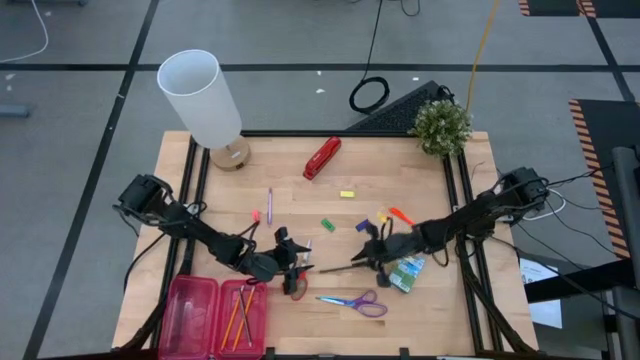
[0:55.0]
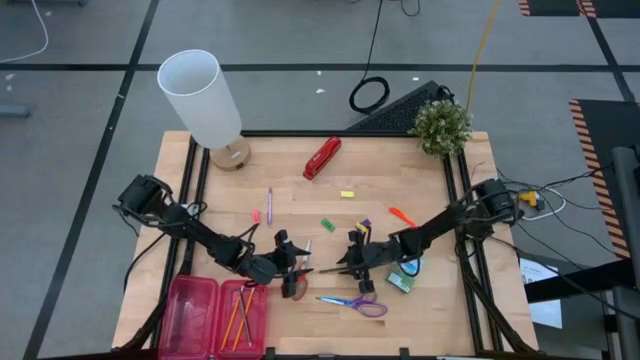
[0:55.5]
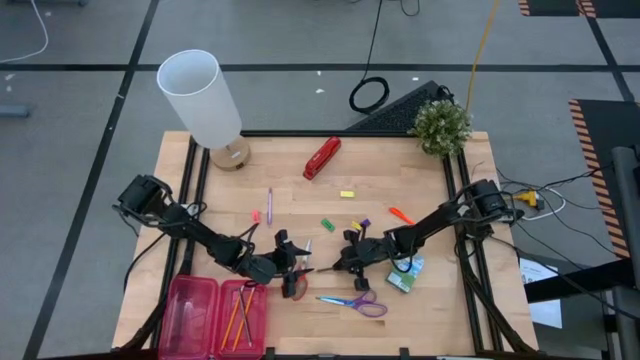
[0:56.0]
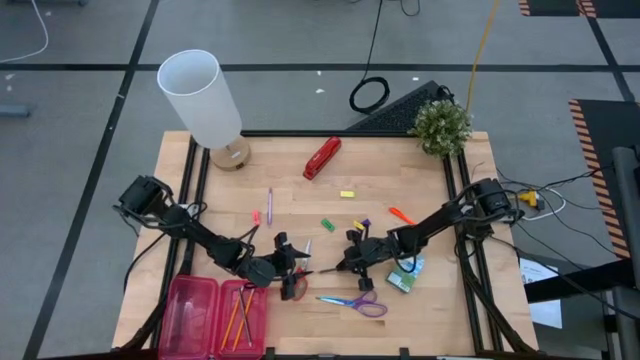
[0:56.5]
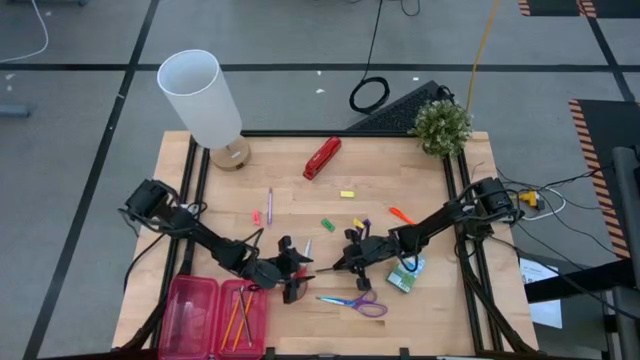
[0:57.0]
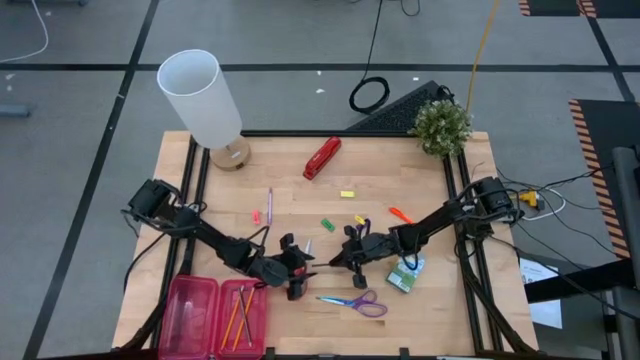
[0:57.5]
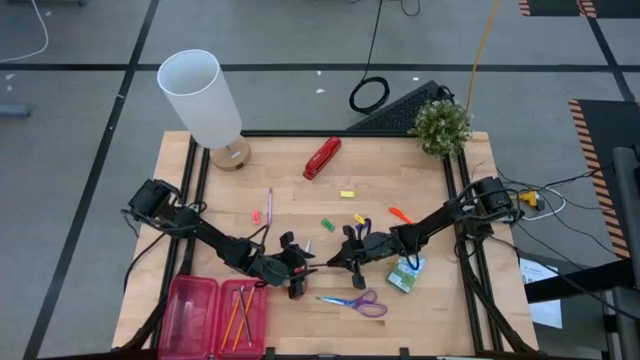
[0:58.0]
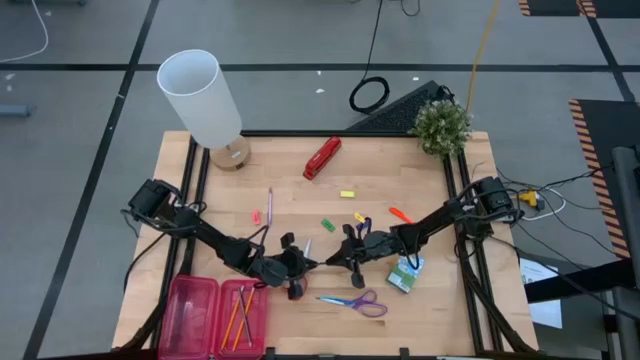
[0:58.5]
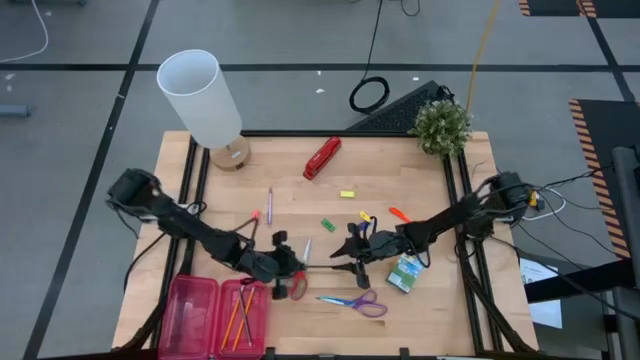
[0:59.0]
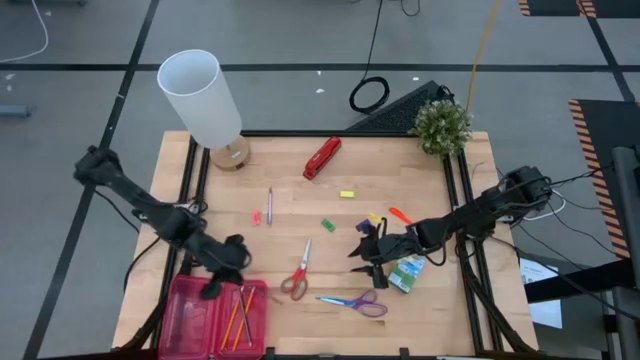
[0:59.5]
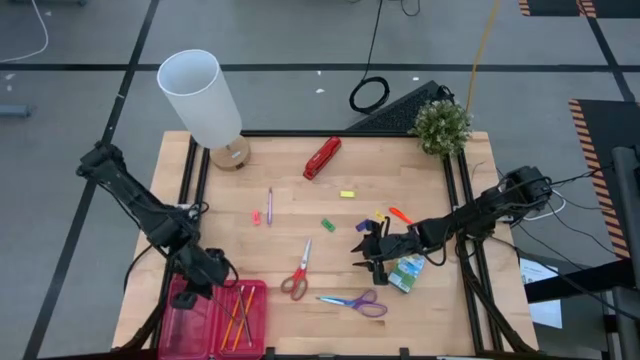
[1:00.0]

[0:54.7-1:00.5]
Task: Pack school essentials
Put the black pencil into the red supply box

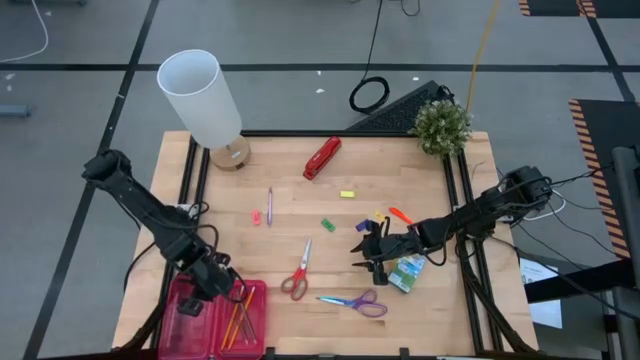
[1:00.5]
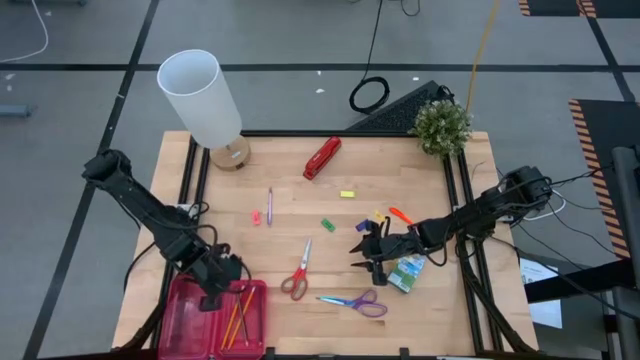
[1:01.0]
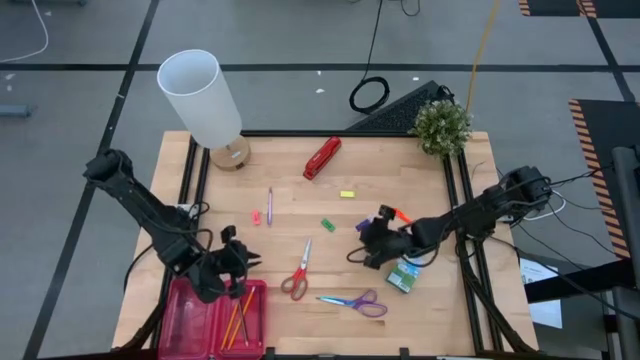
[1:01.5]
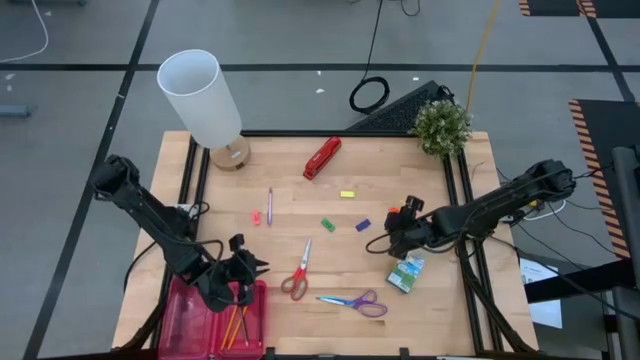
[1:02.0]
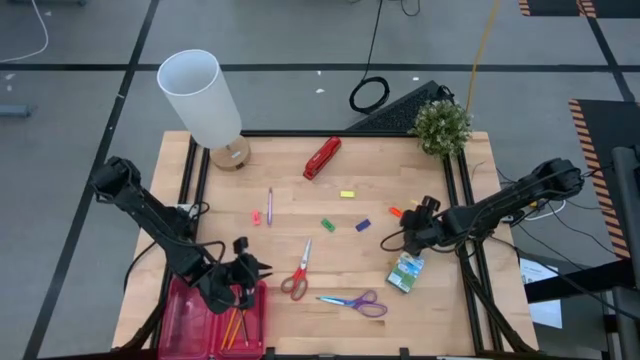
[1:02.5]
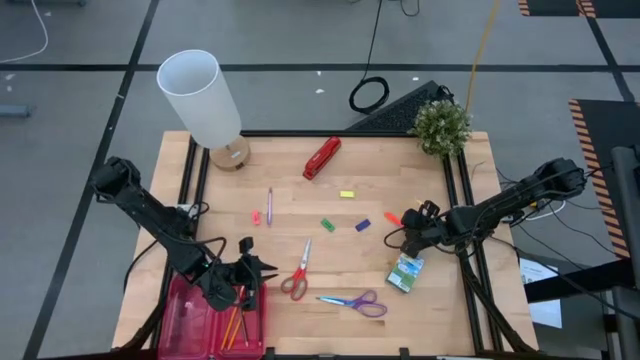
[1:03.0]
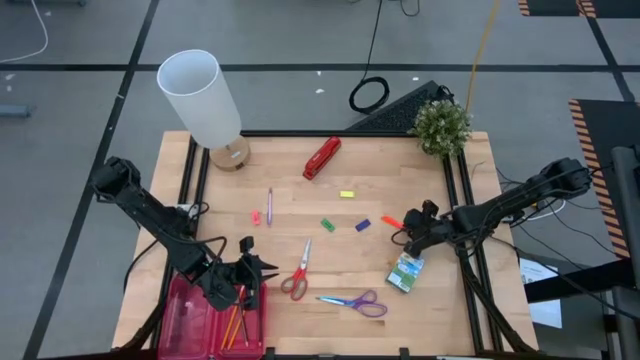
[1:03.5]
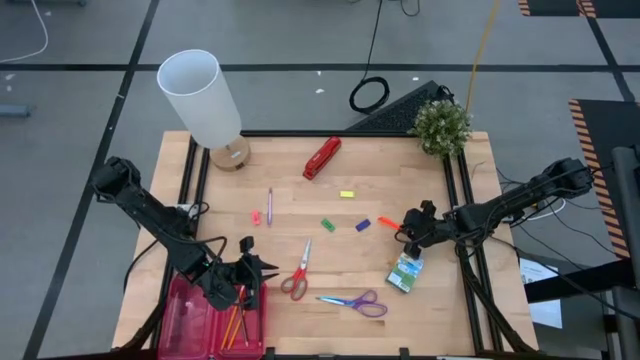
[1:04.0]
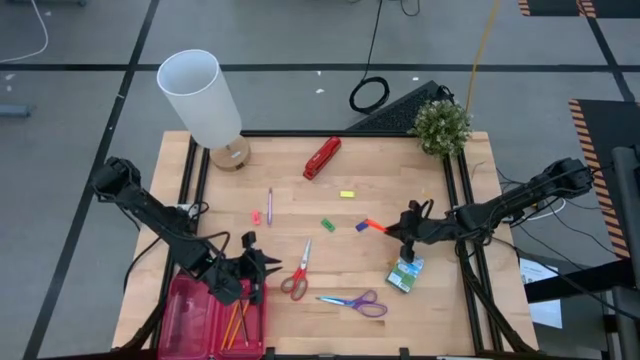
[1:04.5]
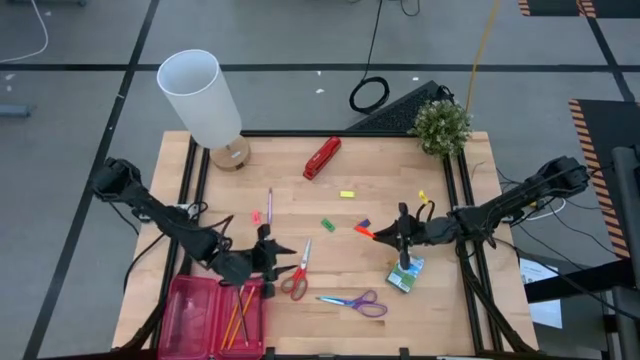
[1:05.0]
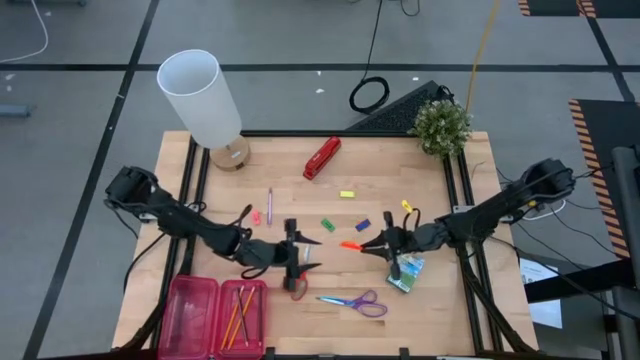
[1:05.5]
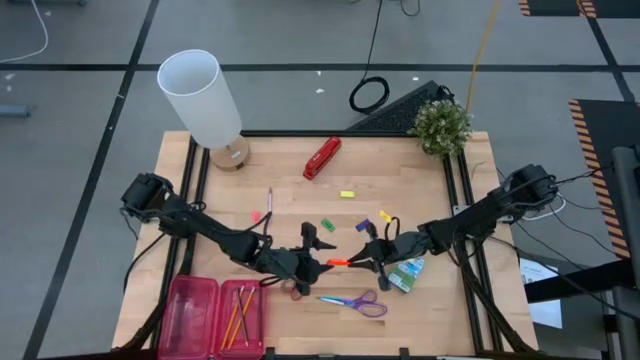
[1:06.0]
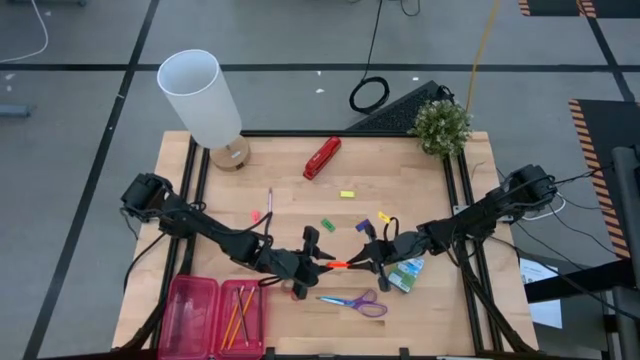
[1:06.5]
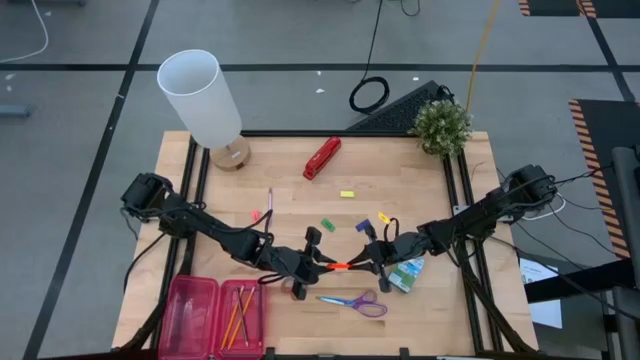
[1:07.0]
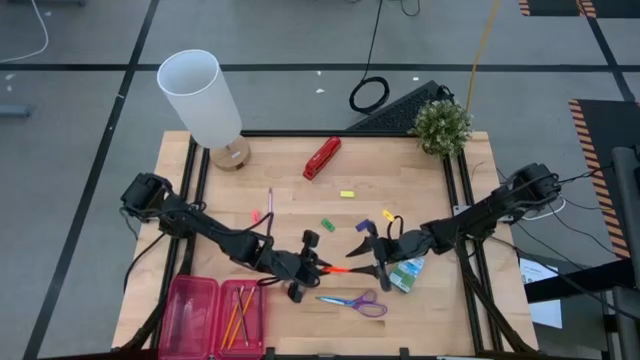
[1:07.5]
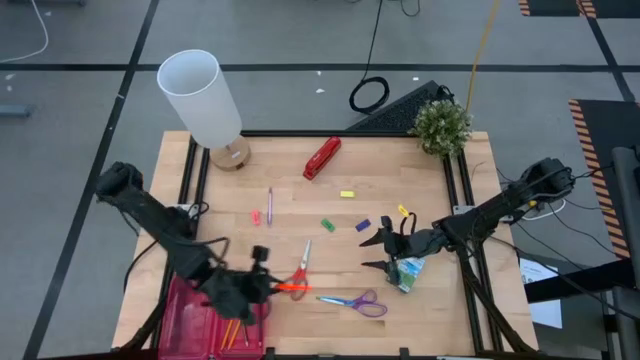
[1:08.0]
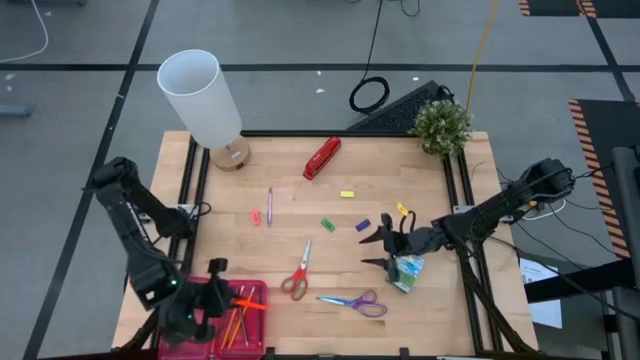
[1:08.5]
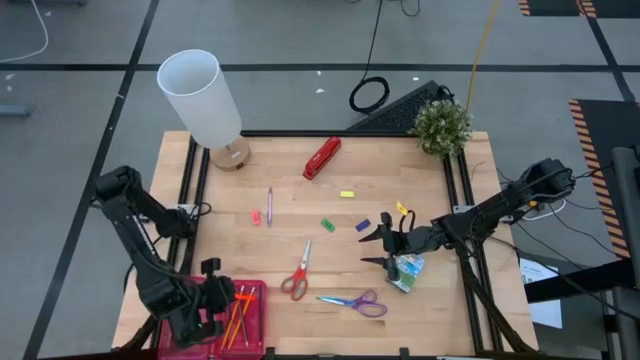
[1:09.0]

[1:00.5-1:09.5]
Put the orange pen into the red supply box

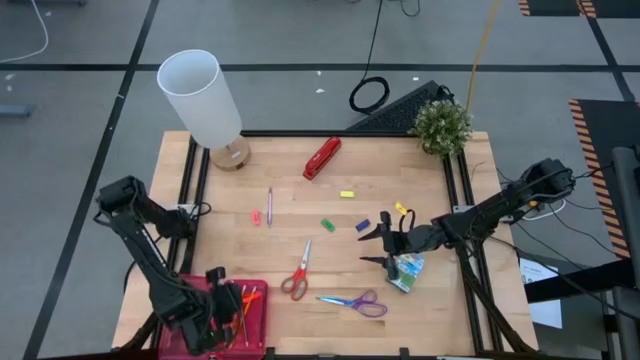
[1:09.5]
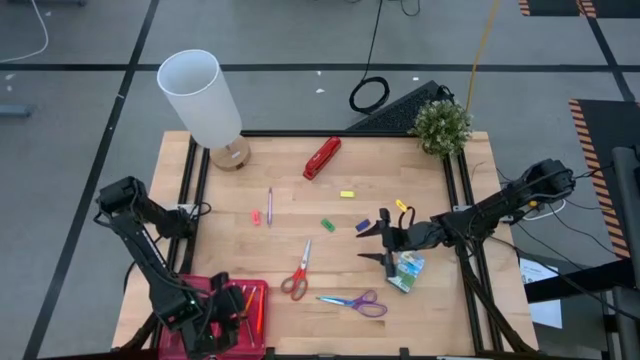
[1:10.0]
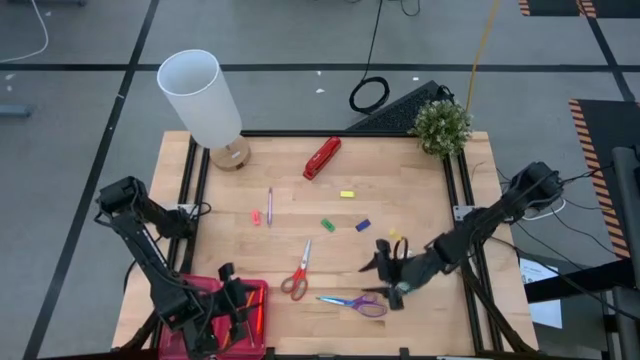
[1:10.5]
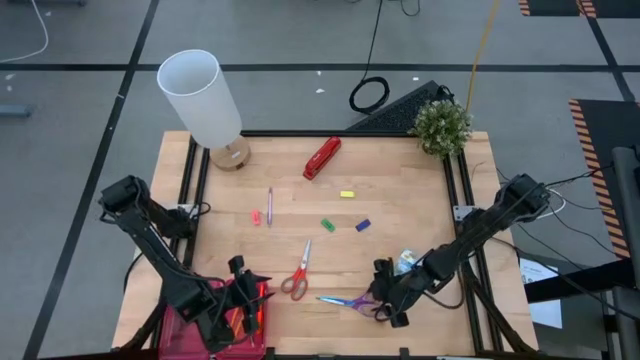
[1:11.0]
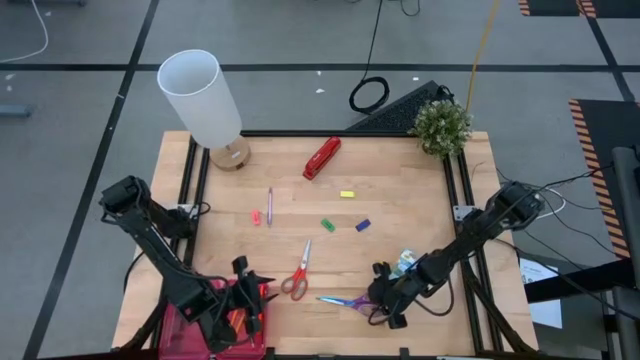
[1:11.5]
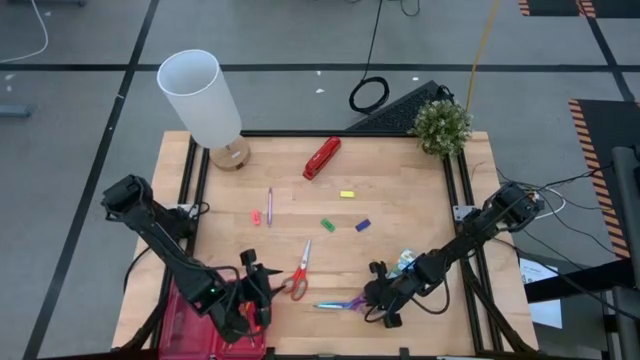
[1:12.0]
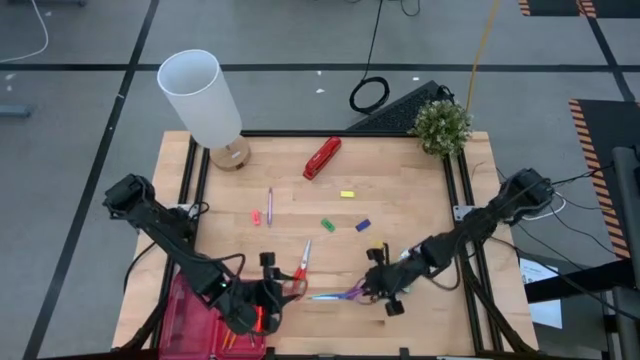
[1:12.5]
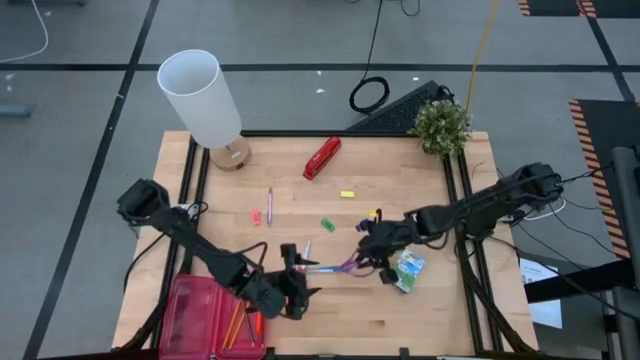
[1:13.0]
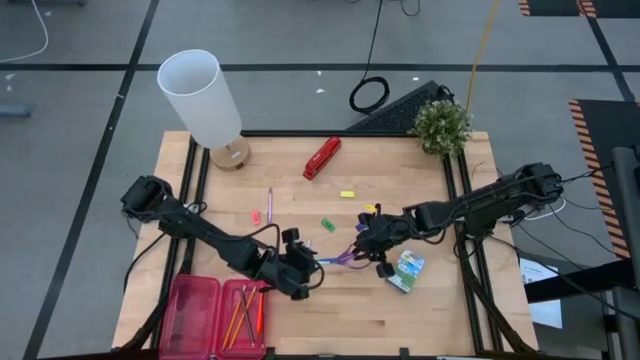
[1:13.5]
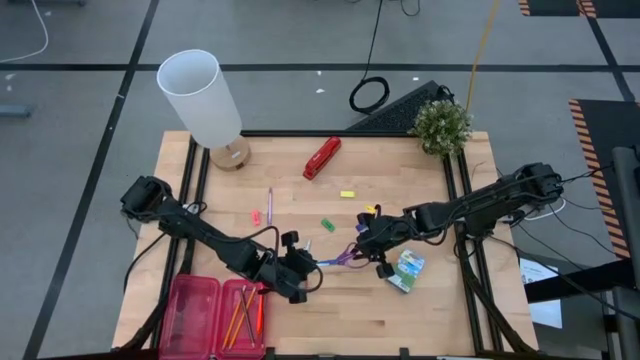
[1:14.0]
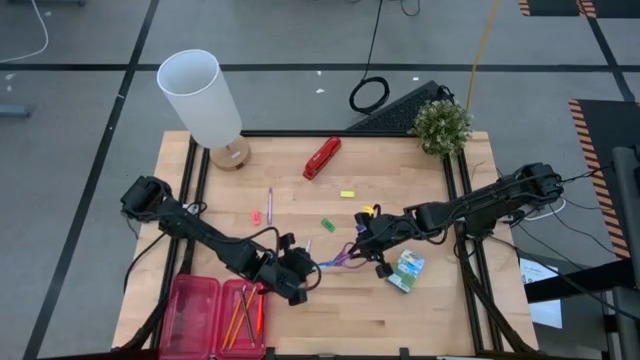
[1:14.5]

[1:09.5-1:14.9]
Put the purple scissors into the red supply box

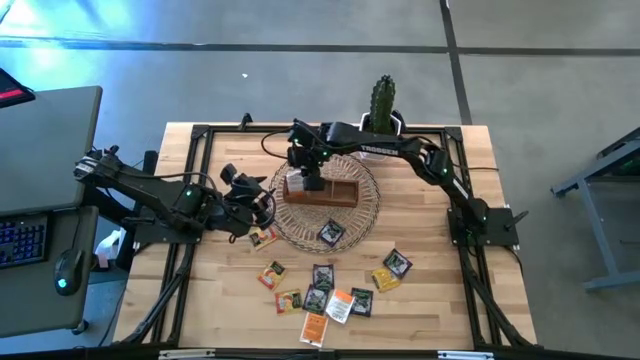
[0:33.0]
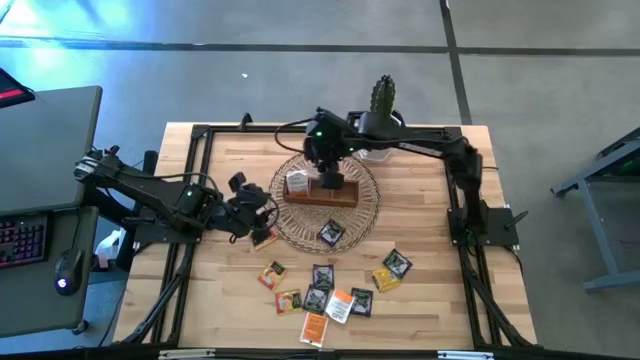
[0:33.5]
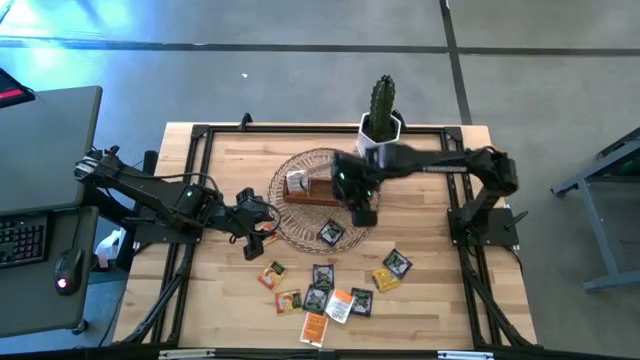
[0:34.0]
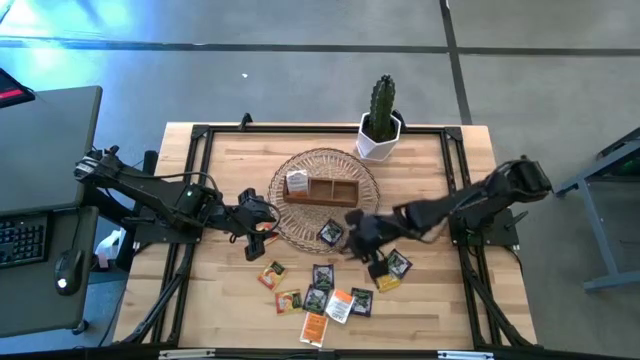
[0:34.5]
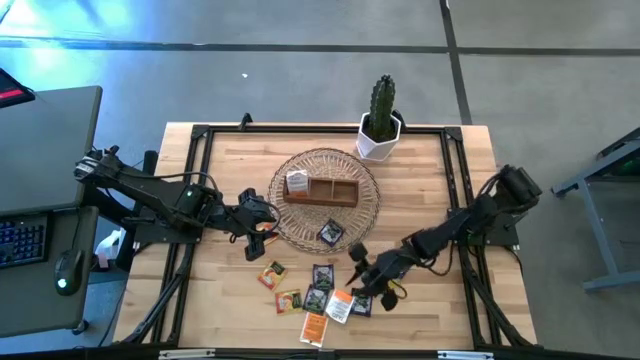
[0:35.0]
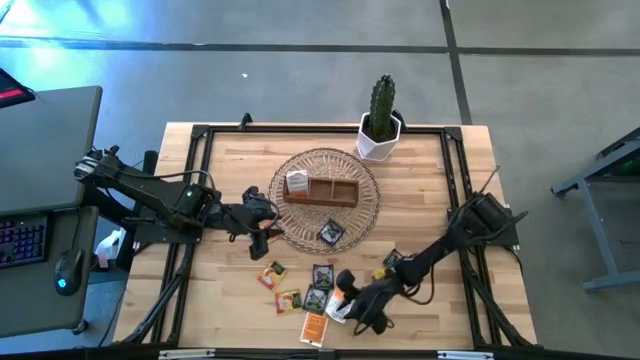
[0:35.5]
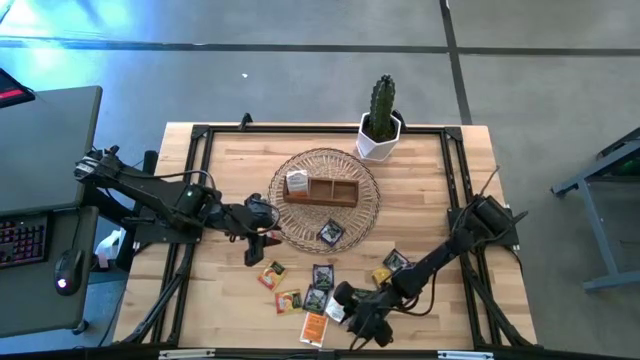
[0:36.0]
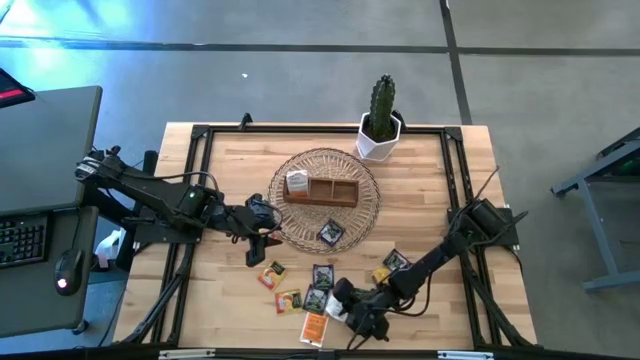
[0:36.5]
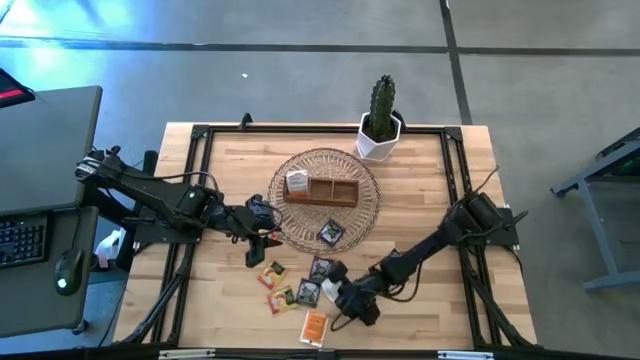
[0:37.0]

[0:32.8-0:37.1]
Task: Pick & Place Tea
Put the orange tea pack into the left section of the wooden organizer
